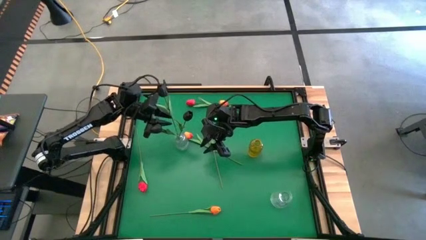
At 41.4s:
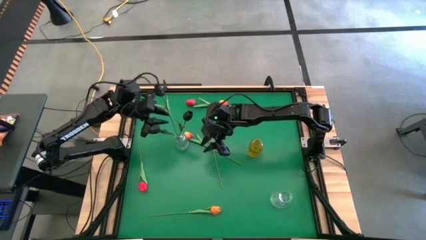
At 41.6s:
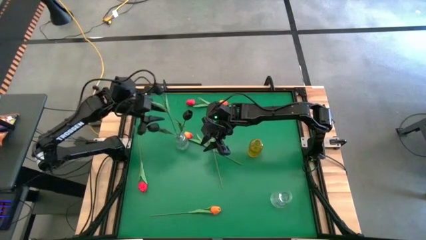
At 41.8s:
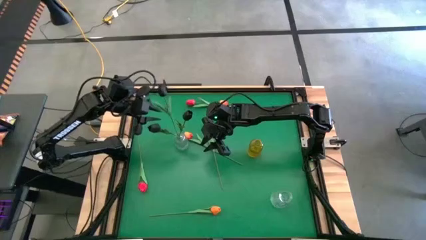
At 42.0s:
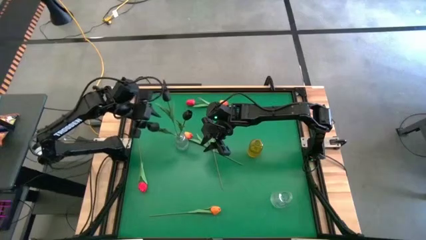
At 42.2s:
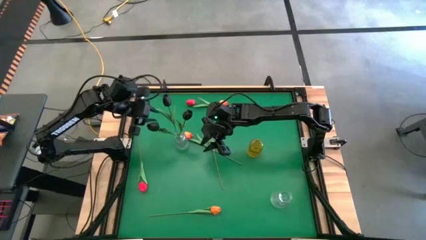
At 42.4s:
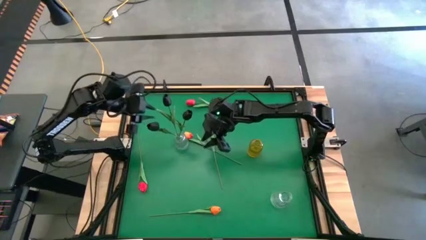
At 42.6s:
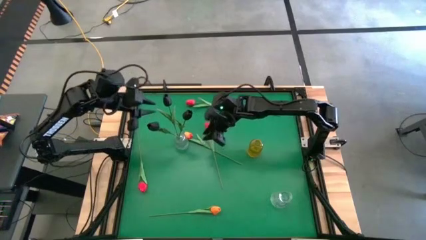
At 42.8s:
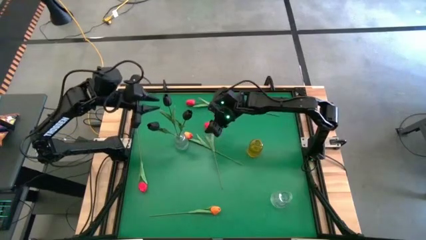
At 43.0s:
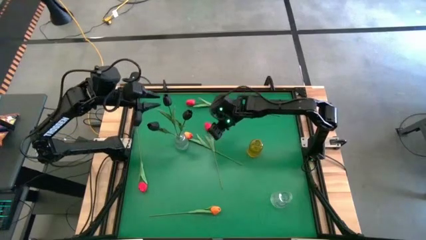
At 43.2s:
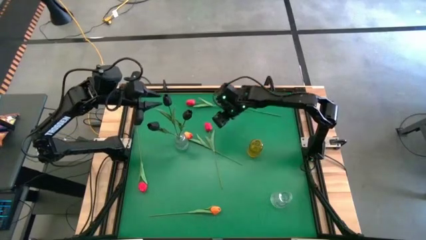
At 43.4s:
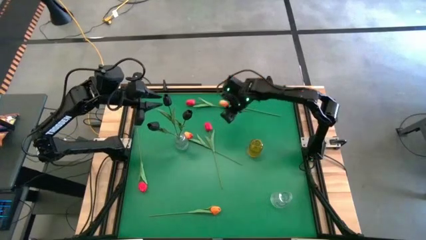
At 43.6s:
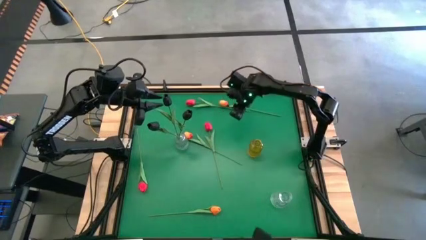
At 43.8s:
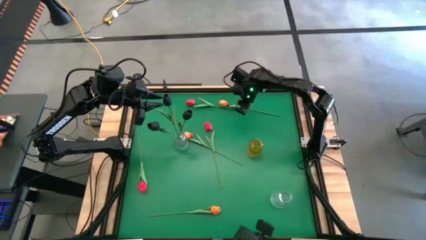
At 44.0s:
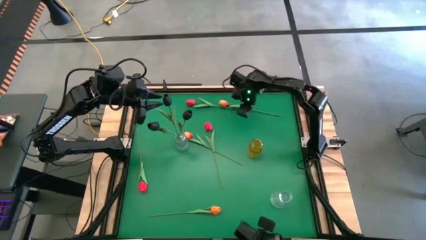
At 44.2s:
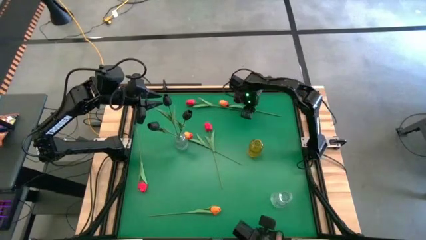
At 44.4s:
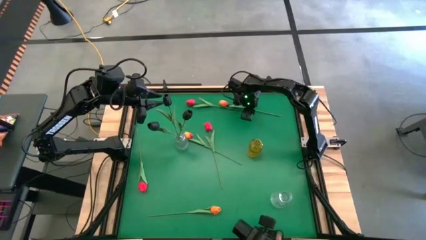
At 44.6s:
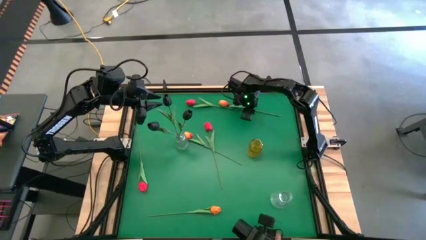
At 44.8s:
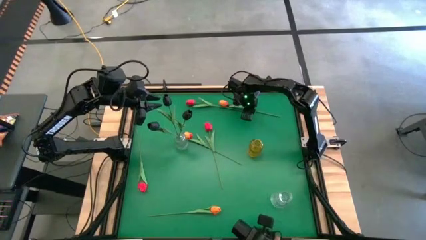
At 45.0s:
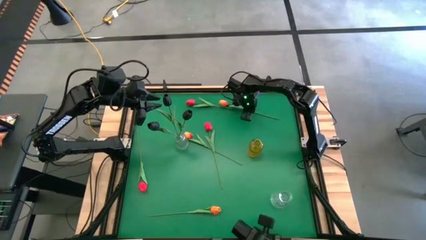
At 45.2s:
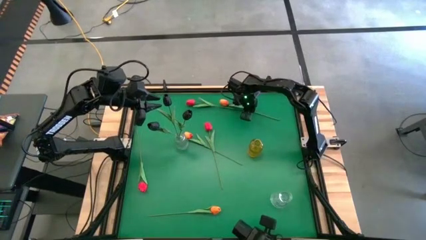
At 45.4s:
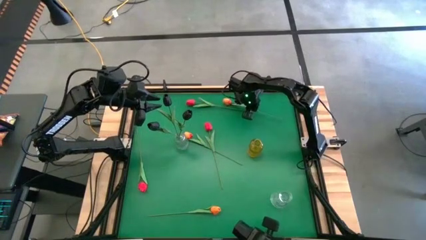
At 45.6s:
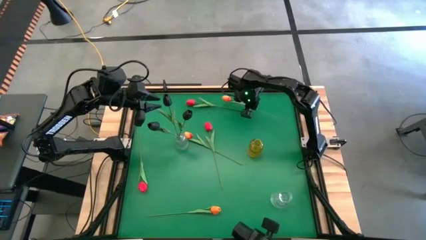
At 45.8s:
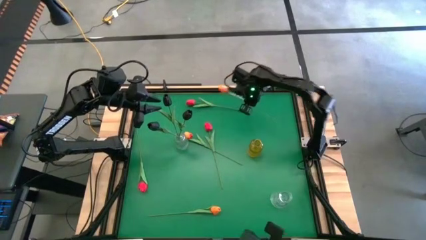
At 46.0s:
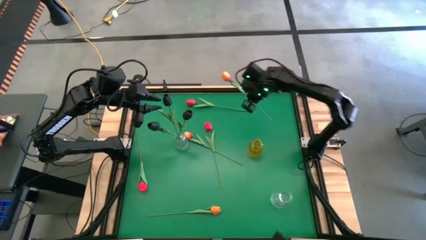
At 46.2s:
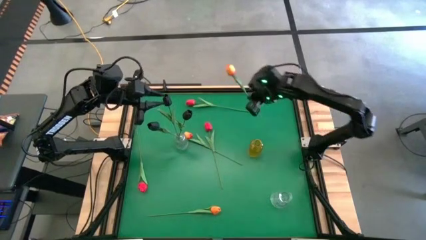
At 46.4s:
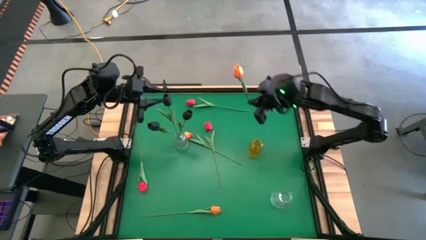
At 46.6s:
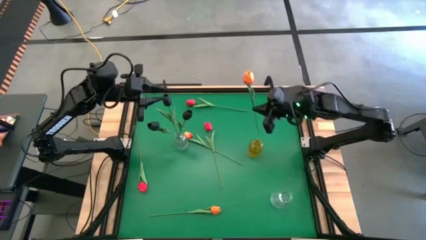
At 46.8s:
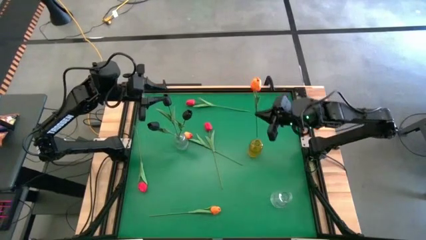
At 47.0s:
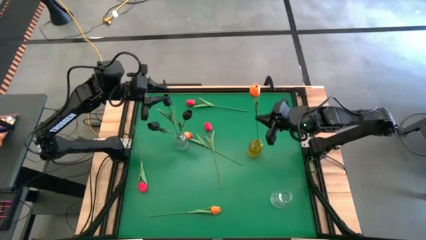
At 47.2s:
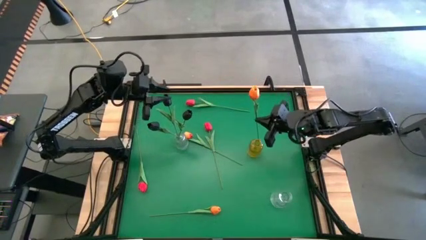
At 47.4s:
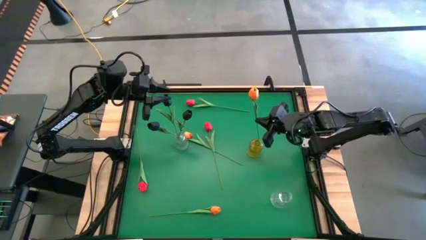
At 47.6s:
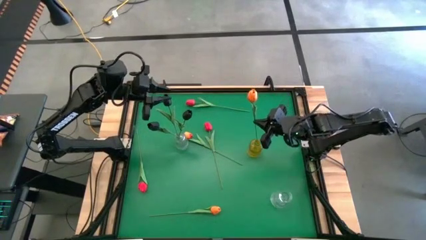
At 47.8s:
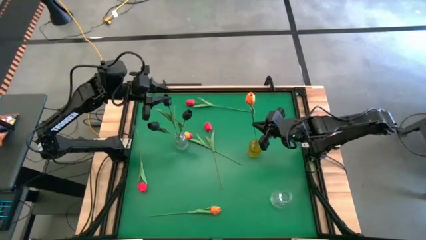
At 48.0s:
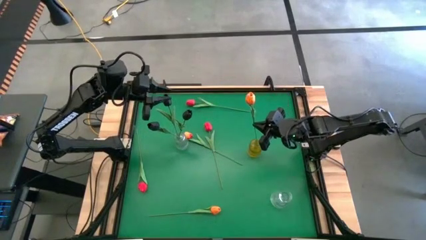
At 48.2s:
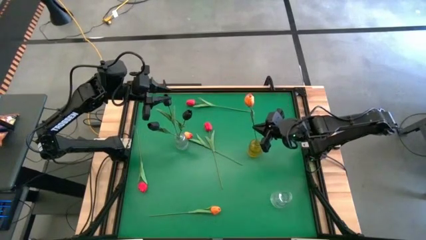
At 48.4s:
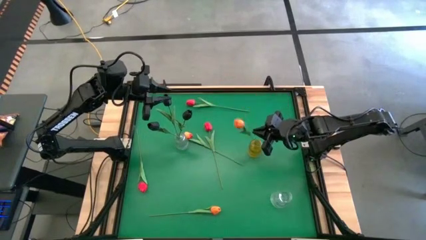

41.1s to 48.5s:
Task: Sort flowers into vase by color
Put the top right orange tulip into the yellow vase

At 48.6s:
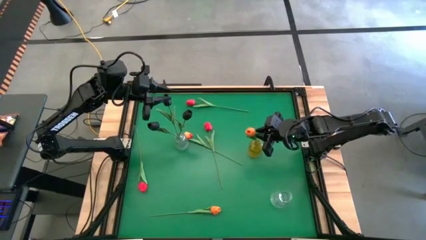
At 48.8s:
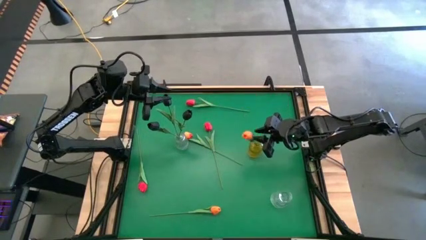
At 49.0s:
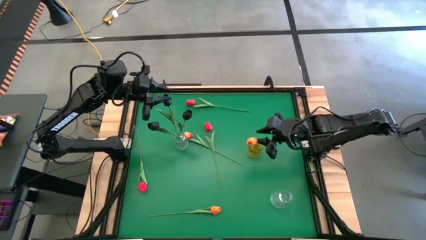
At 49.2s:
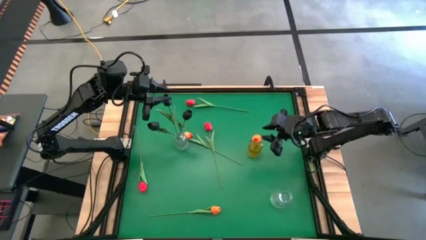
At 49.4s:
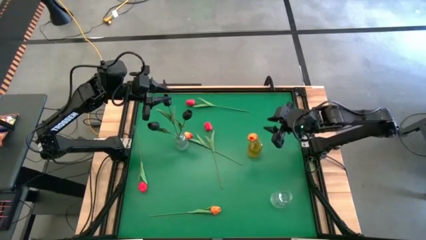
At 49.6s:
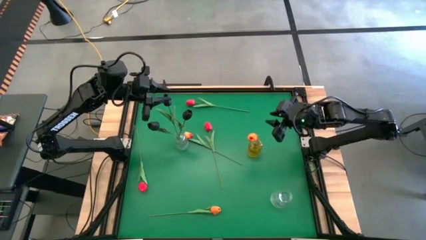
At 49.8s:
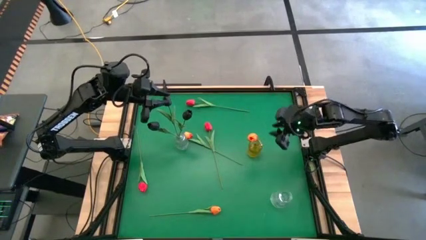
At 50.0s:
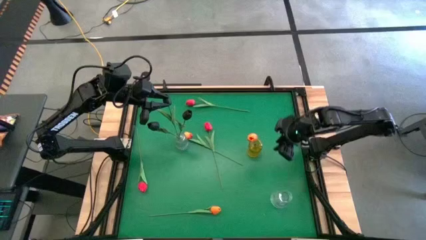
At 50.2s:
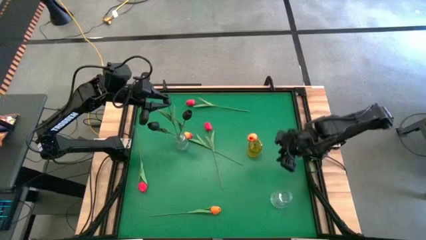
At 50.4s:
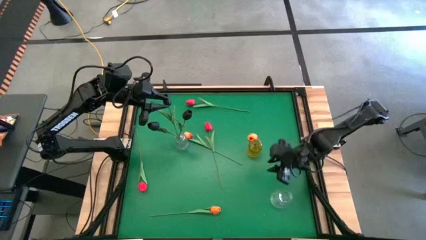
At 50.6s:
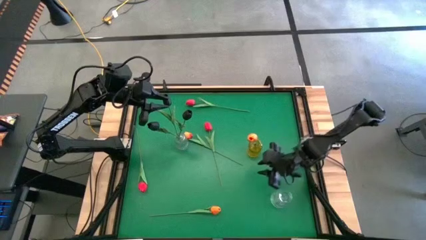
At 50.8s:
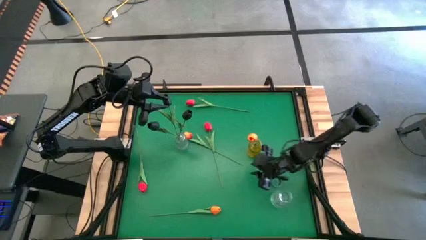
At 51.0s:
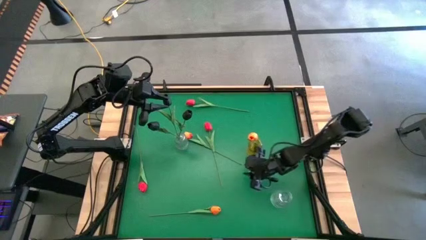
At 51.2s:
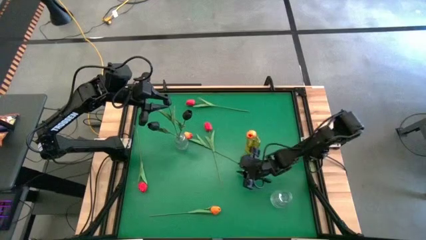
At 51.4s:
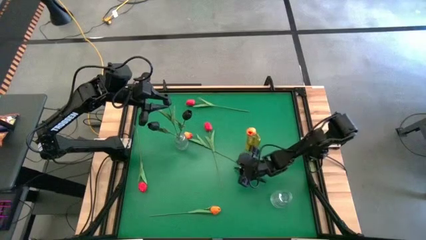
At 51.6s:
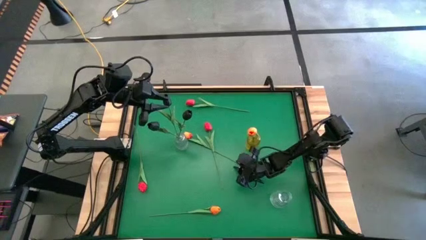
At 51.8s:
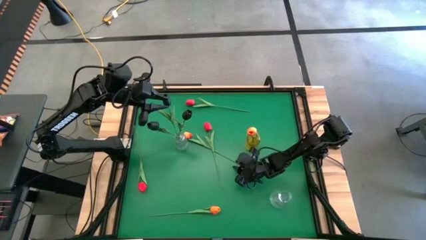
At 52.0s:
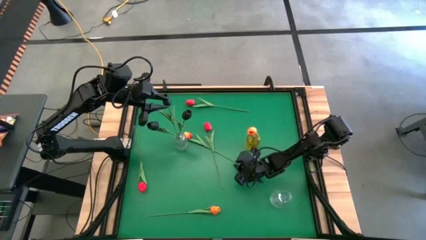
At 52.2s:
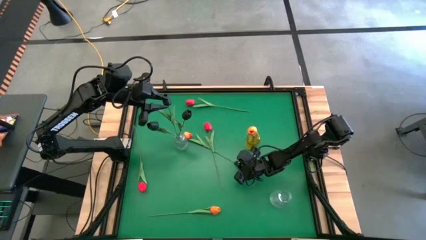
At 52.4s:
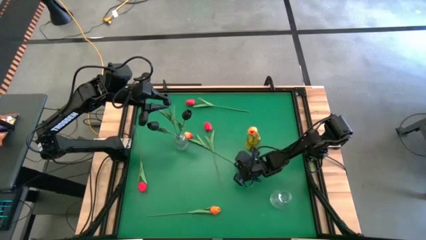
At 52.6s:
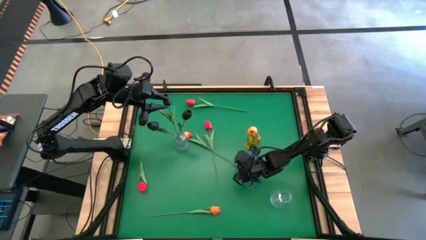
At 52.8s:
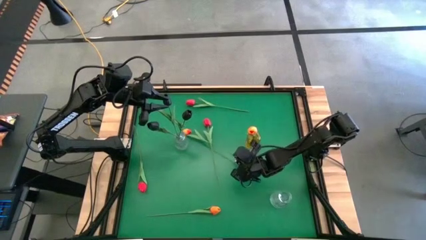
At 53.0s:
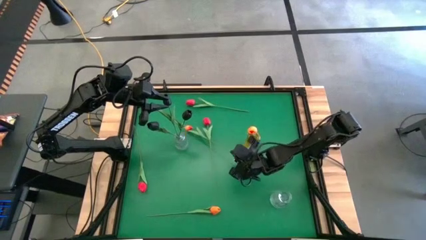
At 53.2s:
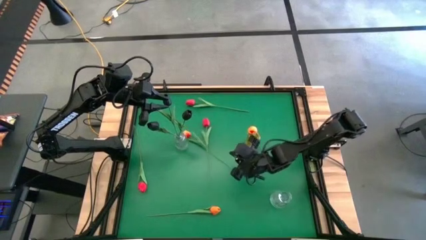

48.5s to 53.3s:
Put the top orange tulip into the yellow vase

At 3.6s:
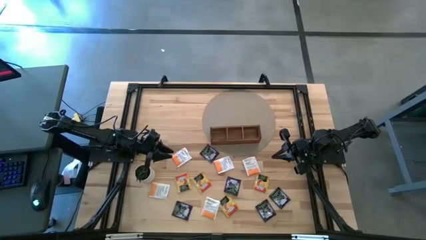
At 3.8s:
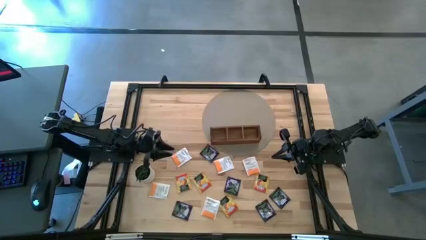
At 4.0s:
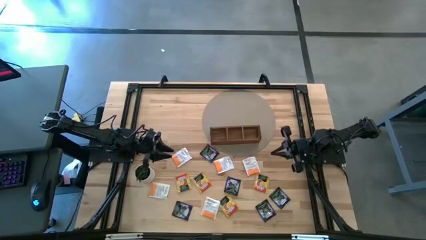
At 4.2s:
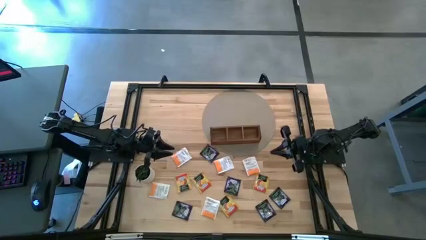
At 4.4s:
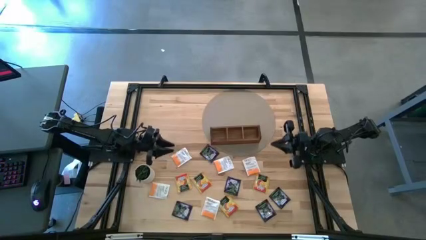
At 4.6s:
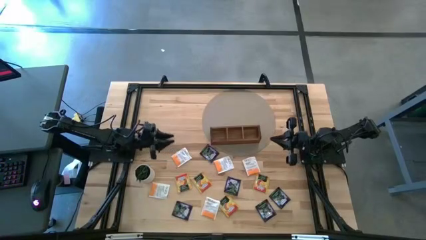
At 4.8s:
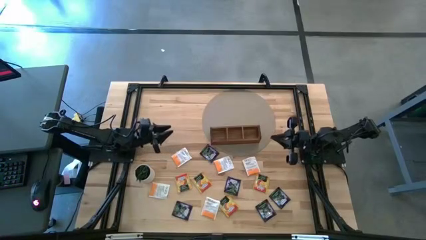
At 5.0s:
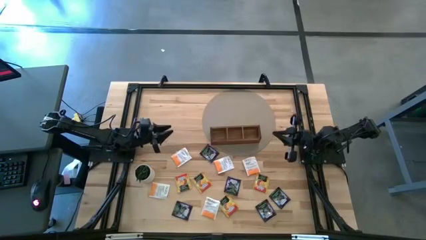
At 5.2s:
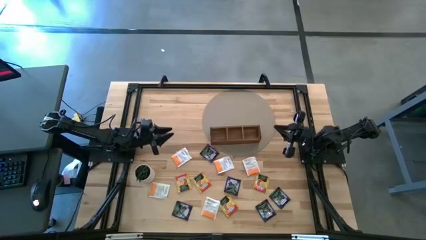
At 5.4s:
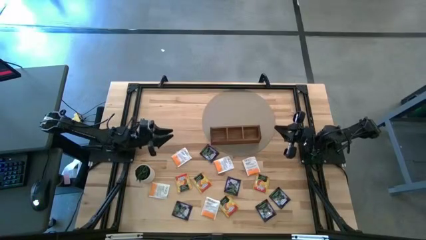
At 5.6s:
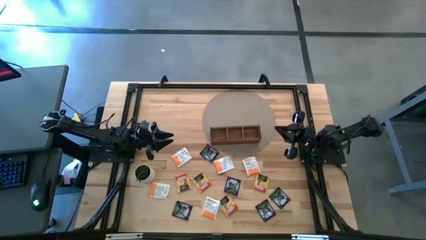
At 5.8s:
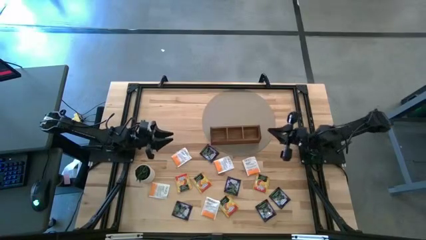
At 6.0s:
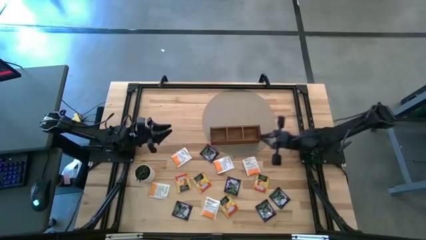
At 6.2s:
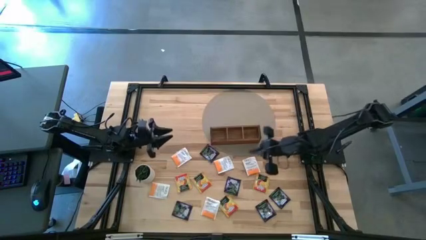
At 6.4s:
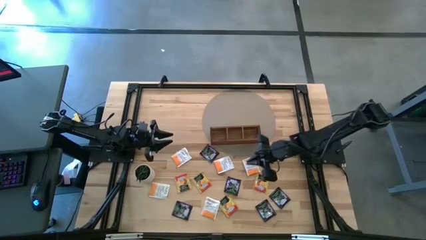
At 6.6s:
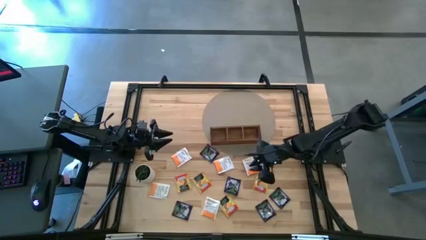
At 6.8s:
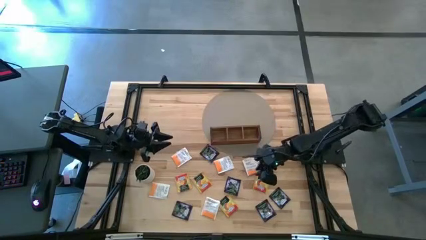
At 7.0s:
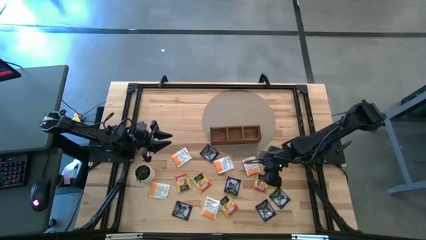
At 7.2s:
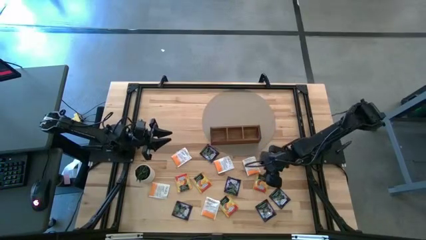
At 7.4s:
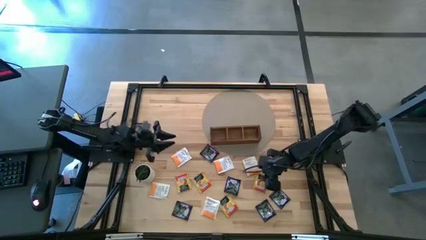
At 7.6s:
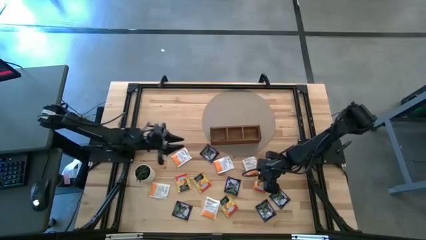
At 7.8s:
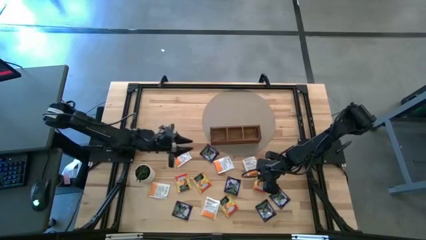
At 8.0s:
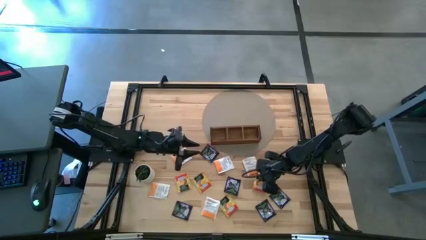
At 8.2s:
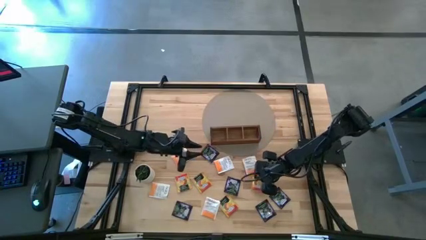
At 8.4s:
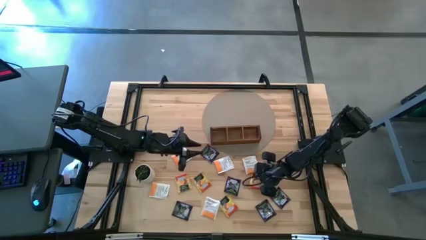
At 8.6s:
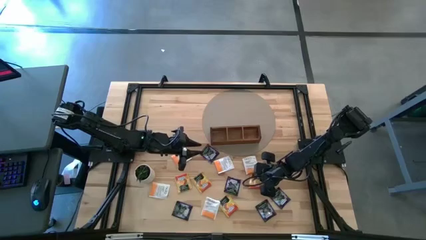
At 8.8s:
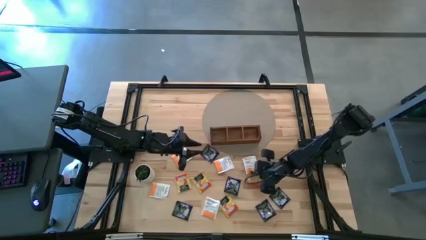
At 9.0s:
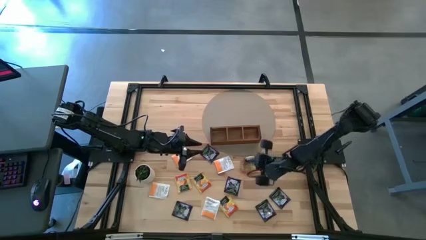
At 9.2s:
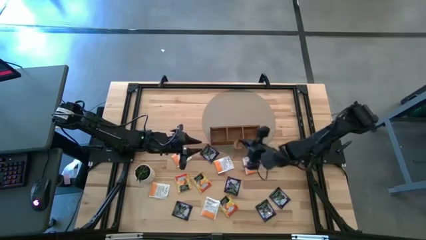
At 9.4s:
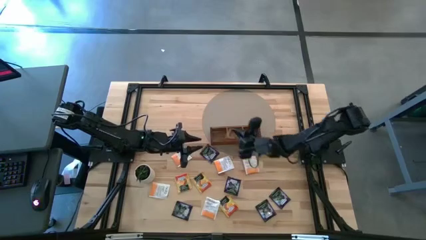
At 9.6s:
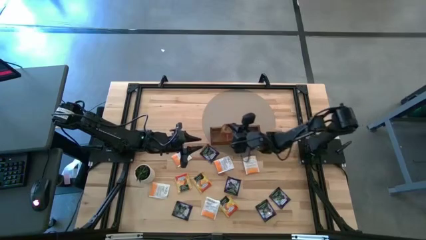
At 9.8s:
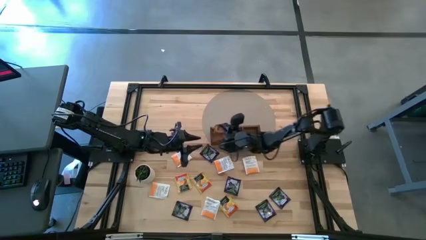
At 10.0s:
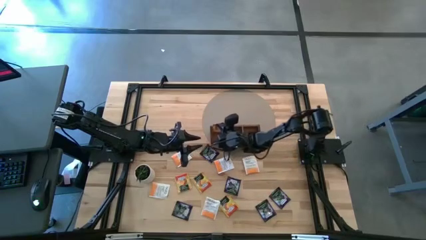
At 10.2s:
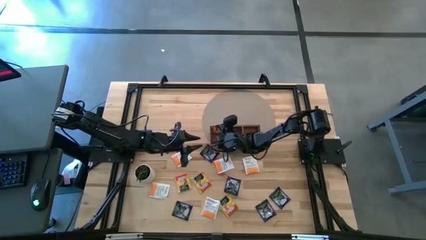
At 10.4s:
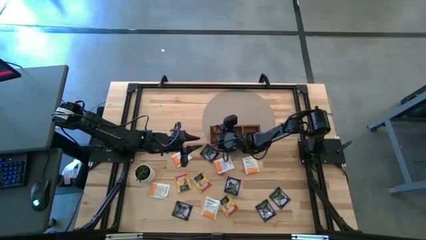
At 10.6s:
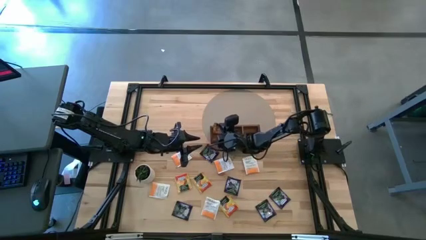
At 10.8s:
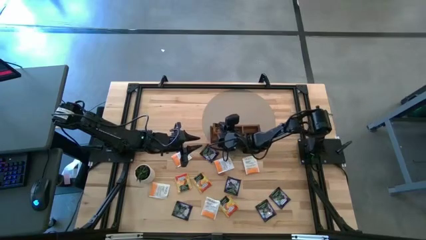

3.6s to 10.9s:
Task: Pick & Place Tea
Put the yellow tea bag into the left section of the wooden organizer
